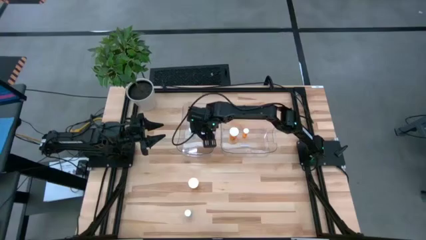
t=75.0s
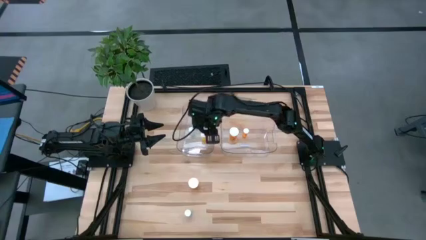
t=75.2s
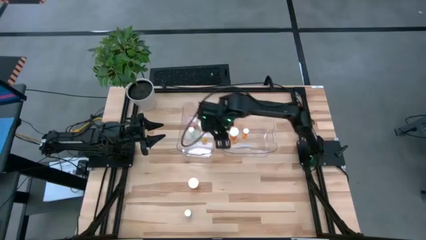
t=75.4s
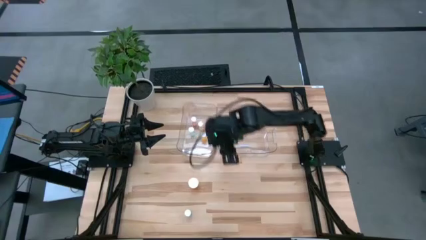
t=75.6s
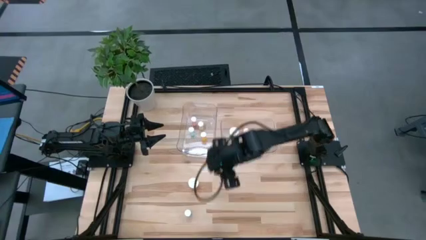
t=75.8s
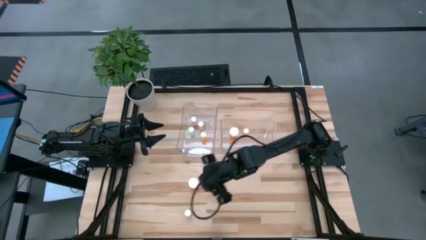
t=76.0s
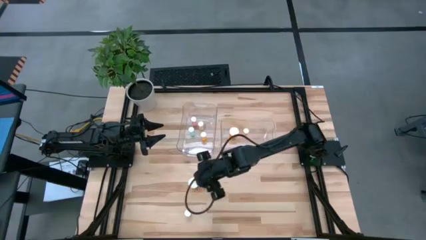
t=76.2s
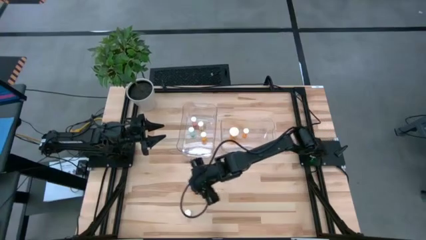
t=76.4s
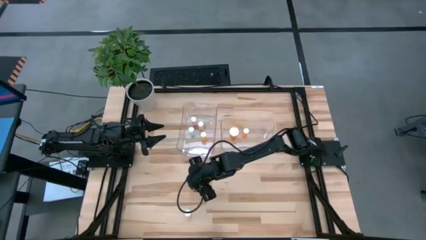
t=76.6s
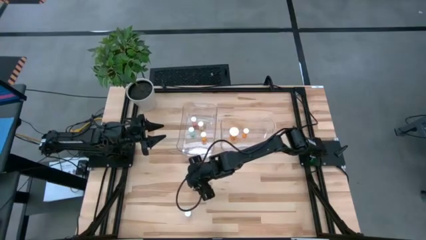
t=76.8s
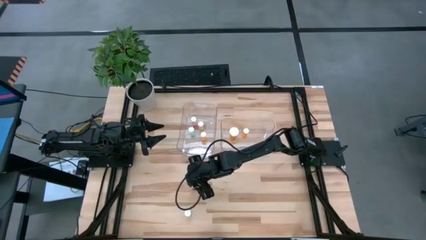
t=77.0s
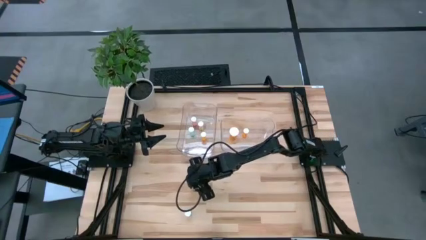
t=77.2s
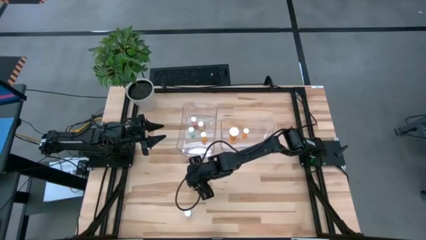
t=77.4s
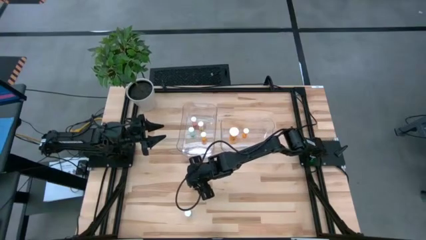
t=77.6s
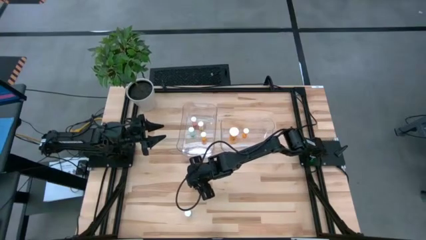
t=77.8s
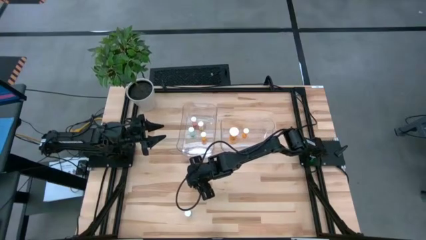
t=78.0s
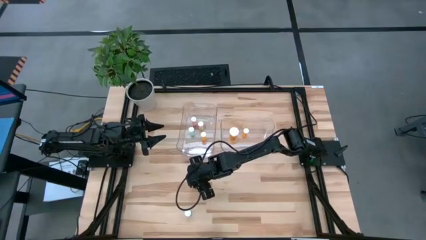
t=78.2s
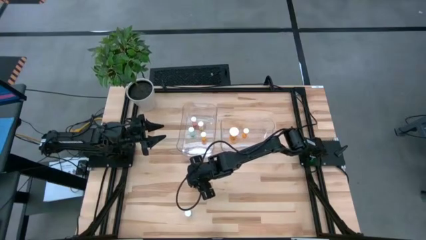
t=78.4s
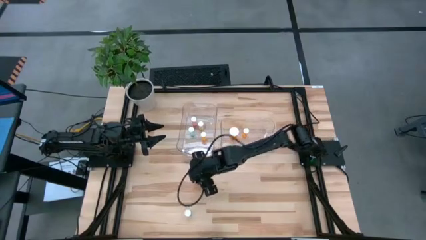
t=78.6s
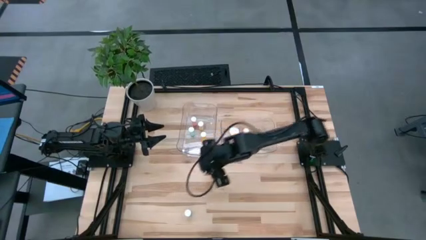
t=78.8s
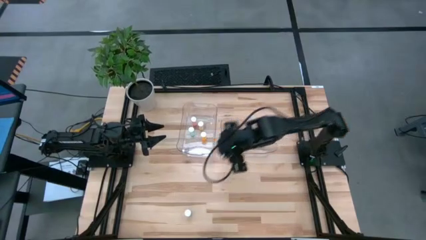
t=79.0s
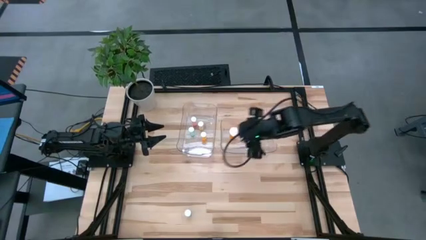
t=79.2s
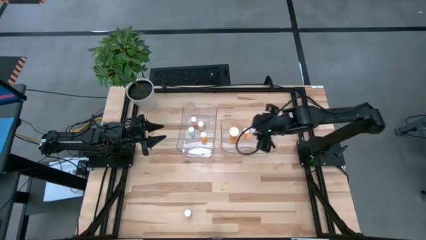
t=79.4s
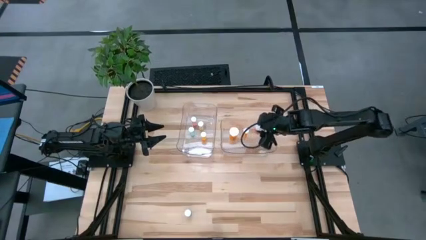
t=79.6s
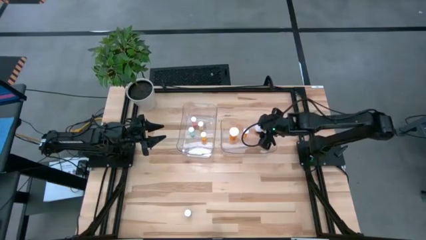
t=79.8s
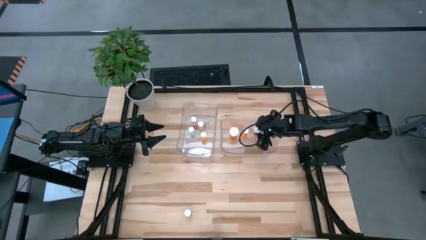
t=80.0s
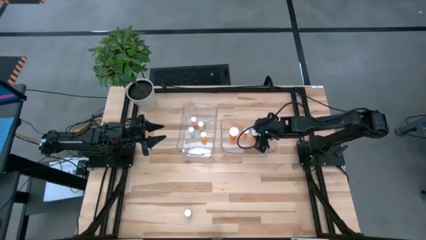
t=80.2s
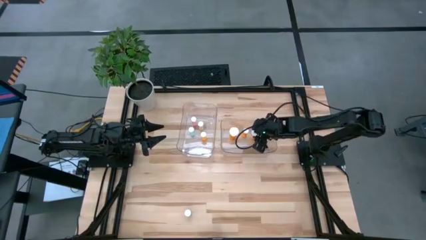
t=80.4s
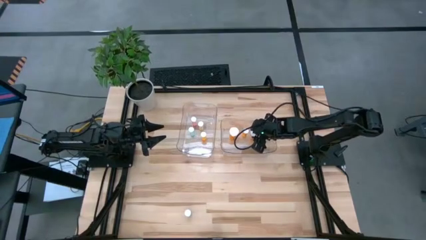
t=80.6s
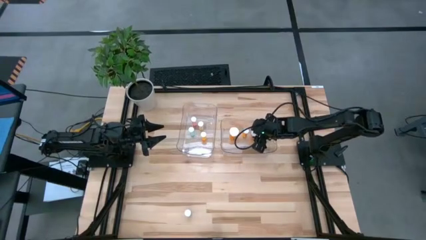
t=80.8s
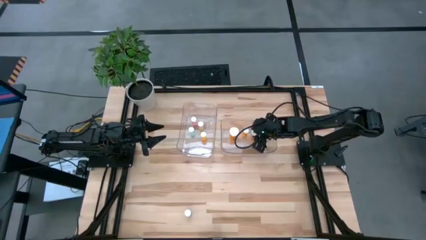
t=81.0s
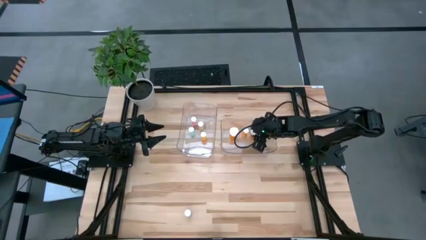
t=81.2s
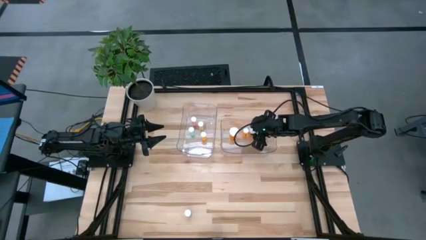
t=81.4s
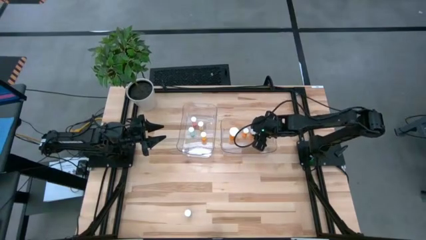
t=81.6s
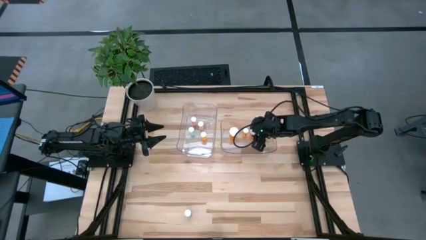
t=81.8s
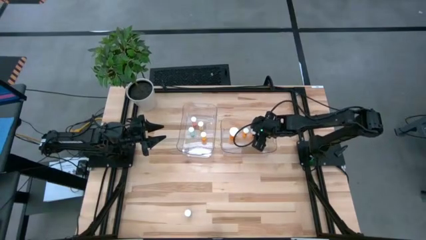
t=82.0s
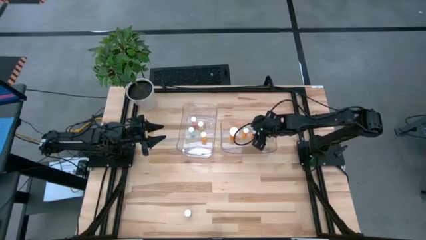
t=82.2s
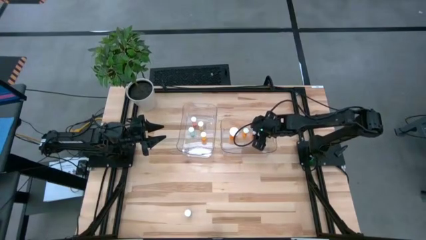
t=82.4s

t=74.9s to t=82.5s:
Task: Pick and place medicine bottles into bin by pill shape (circle, oval)
Put the big orange pill bottle into the right transparent bin

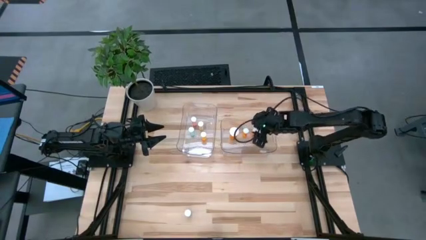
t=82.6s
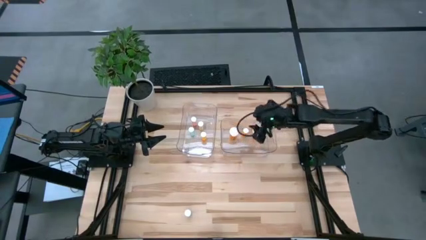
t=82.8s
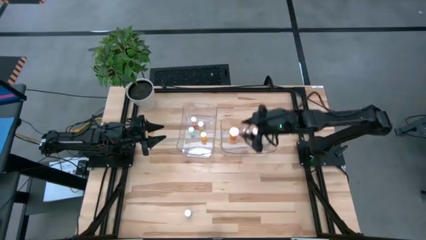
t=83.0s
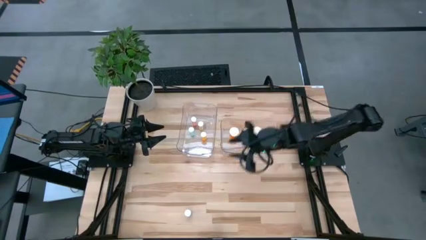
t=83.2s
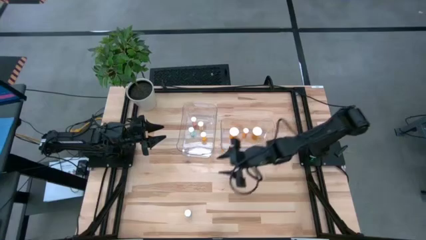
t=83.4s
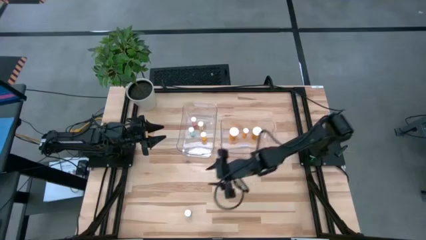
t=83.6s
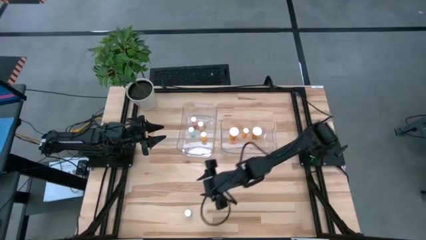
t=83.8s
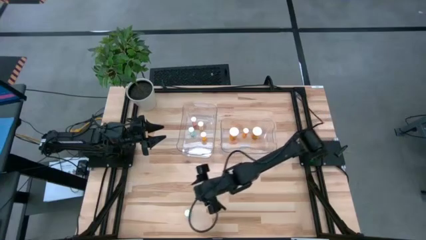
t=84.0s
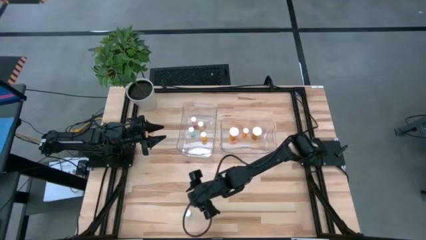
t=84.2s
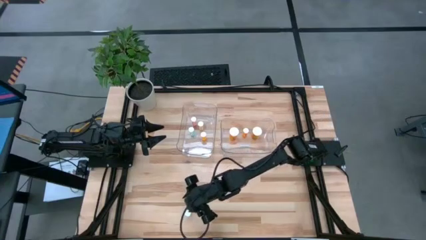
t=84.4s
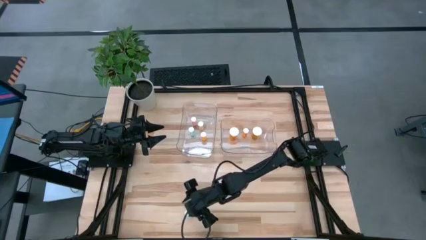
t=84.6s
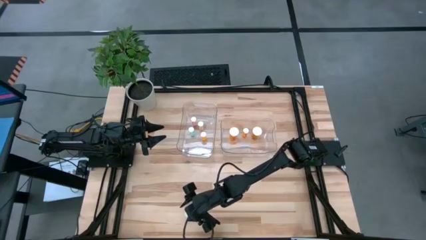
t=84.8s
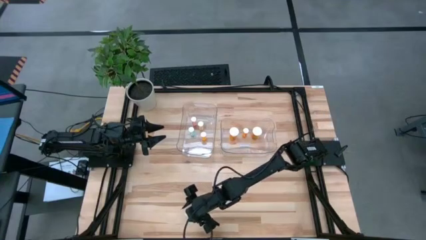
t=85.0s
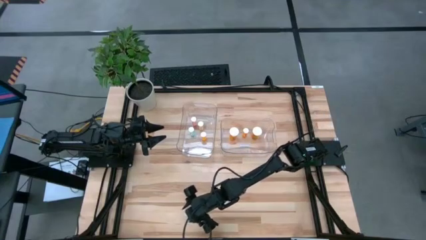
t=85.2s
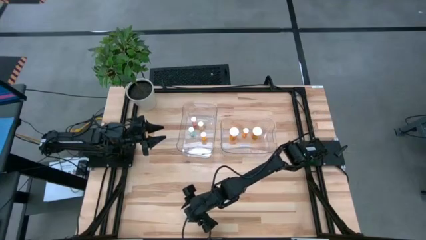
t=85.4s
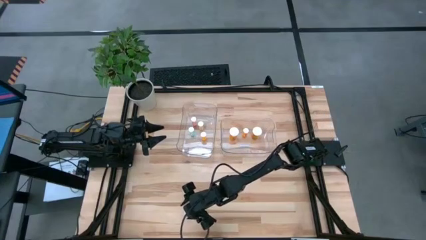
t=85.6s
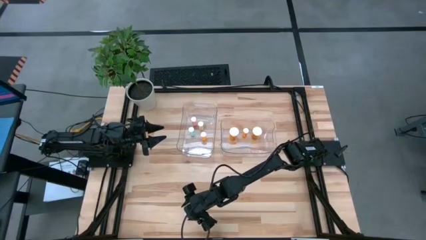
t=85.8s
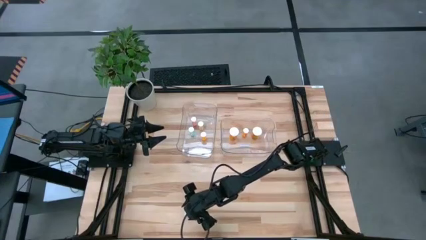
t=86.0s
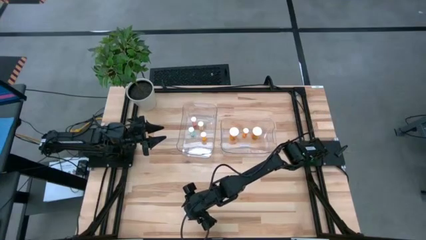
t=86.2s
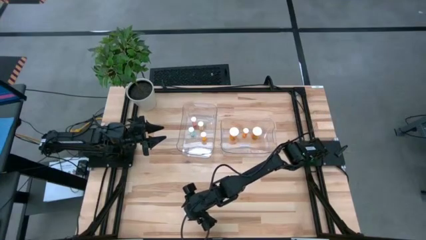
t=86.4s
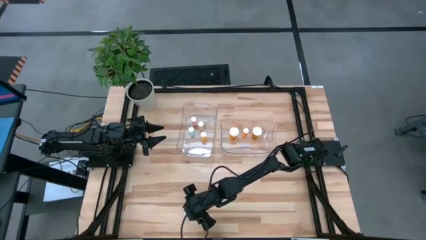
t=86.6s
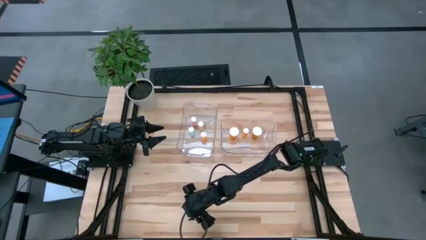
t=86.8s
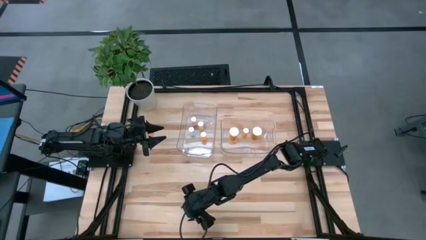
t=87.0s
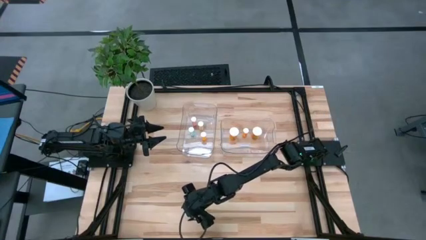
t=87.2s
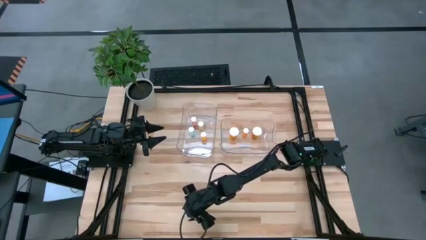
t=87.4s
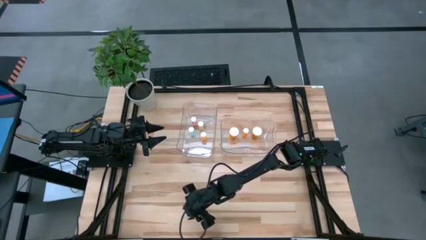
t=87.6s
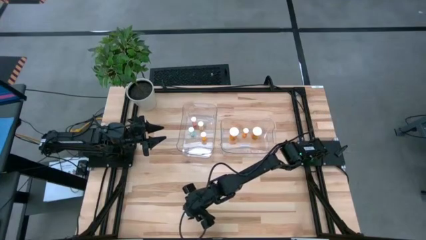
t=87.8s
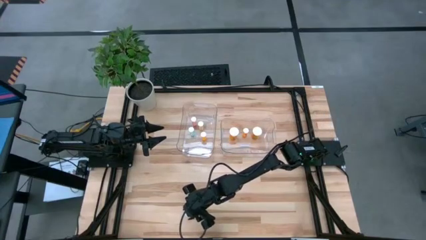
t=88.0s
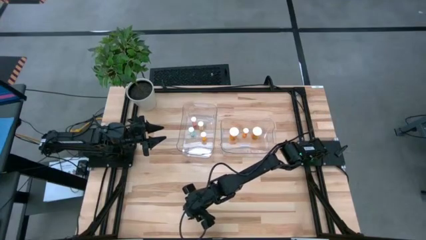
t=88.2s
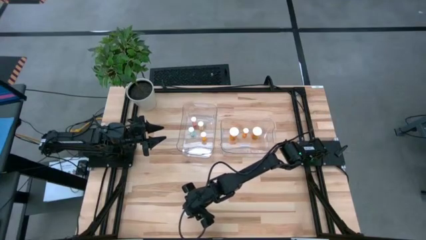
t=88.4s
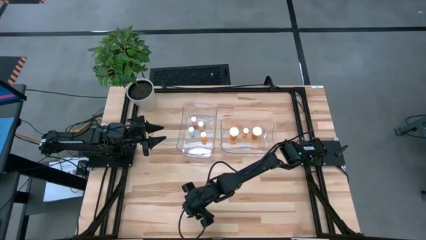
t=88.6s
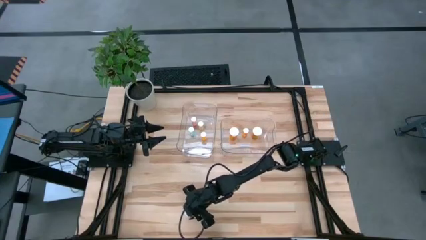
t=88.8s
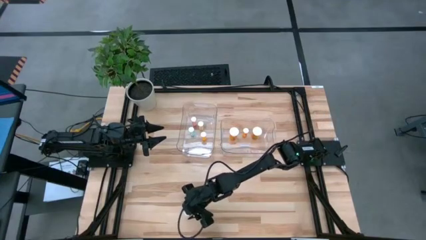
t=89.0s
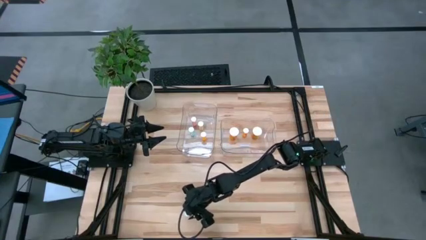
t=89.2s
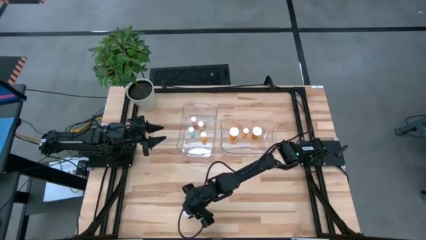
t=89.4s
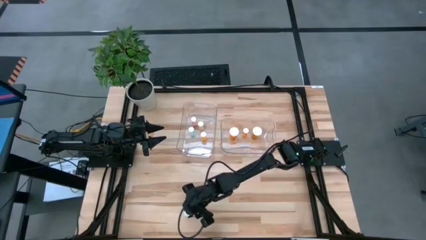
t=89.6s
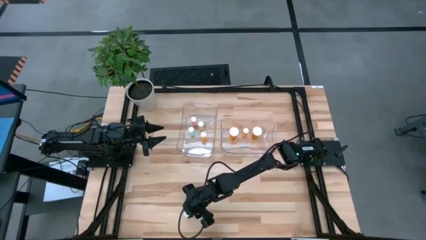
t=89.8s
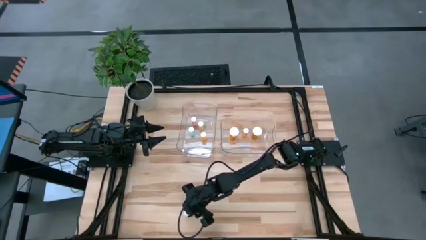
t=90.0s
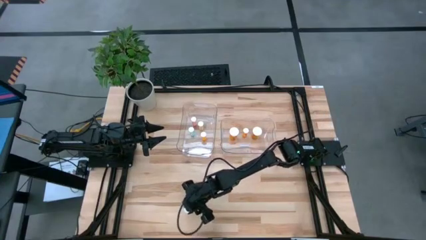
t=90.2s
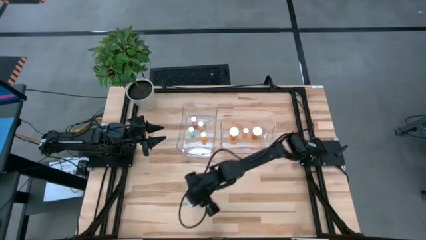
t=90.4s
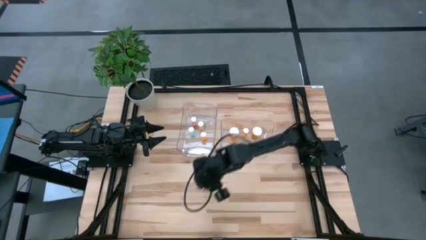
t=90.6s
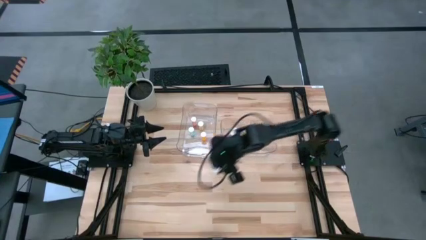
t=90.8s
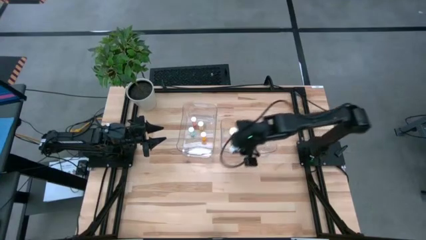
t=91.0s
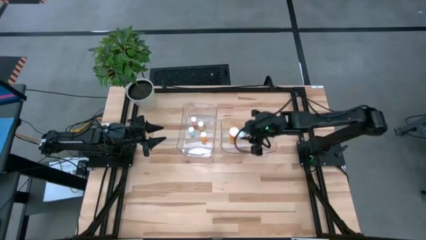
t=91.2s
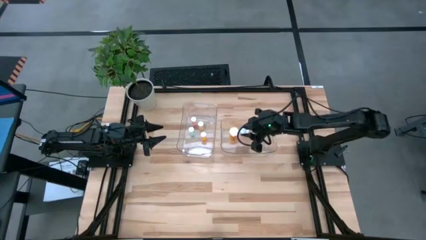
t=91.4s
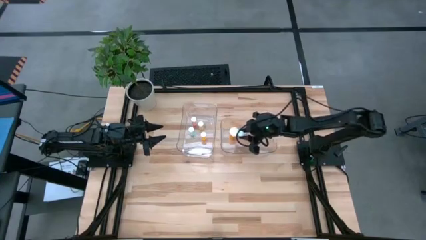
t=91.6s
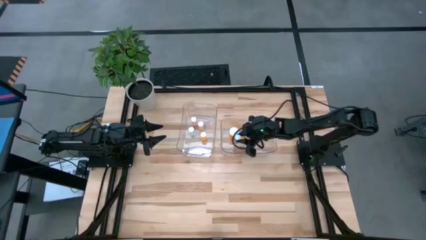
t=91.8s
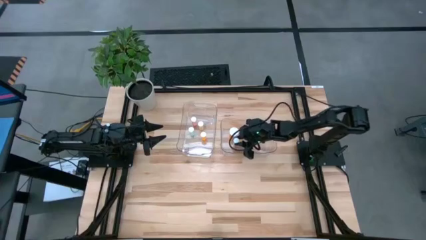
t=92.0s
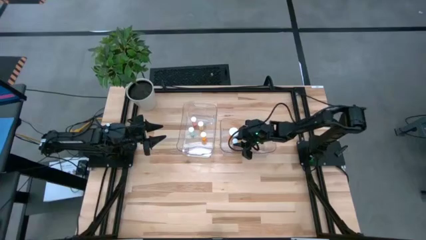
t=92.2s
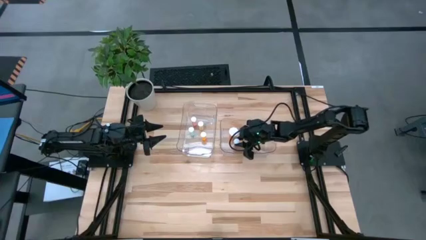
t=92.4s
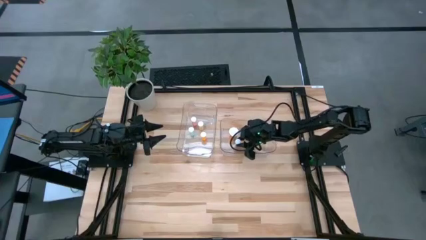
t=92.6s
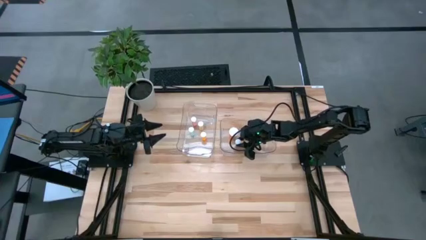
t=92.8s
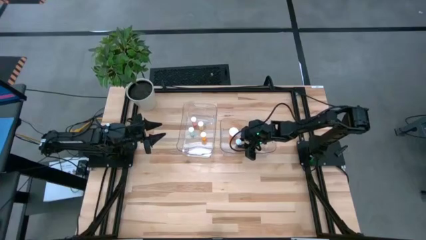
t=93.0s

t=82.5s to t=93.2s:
Put the blue pill bottle into the right transparent bin
